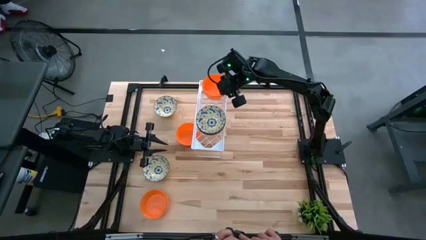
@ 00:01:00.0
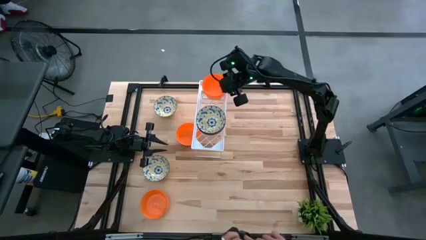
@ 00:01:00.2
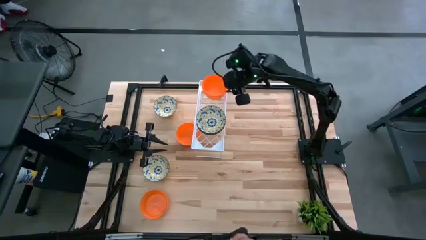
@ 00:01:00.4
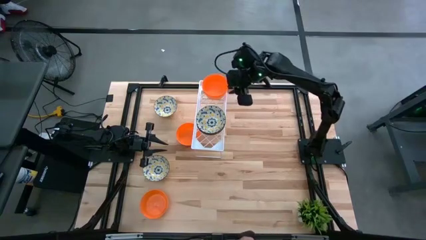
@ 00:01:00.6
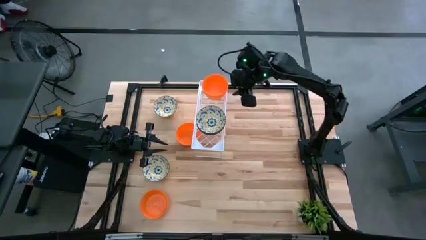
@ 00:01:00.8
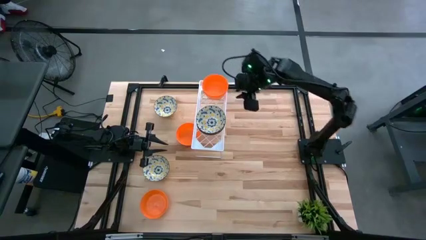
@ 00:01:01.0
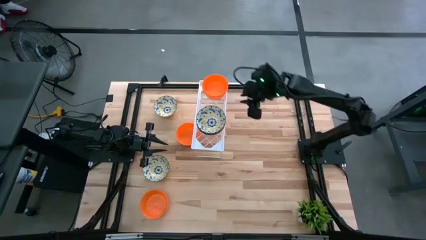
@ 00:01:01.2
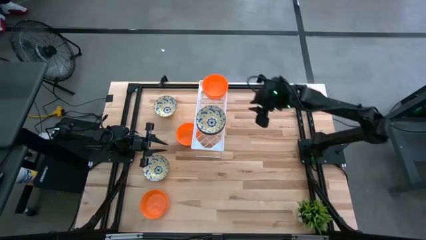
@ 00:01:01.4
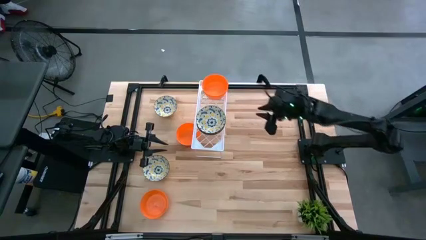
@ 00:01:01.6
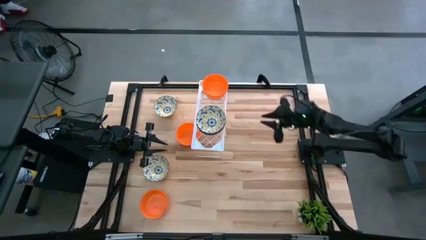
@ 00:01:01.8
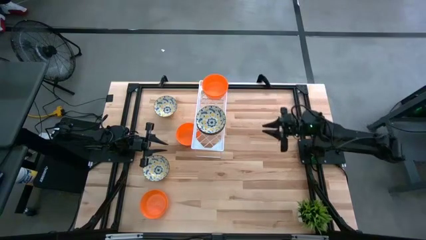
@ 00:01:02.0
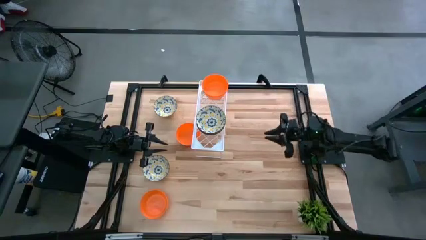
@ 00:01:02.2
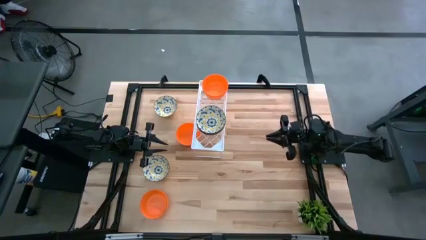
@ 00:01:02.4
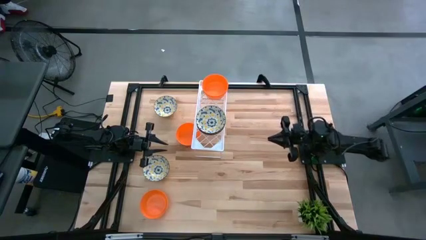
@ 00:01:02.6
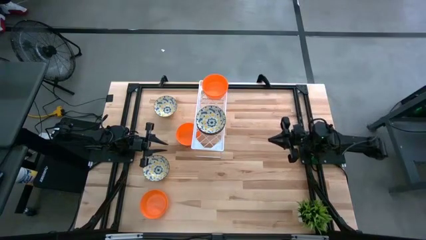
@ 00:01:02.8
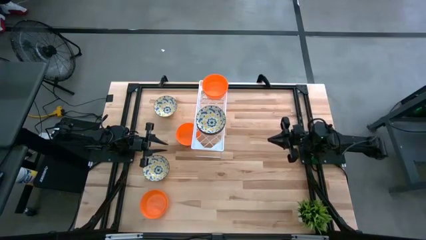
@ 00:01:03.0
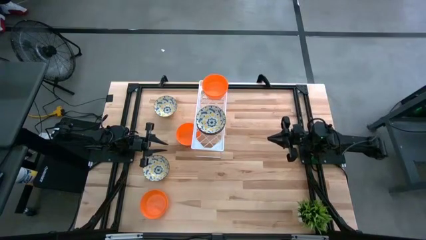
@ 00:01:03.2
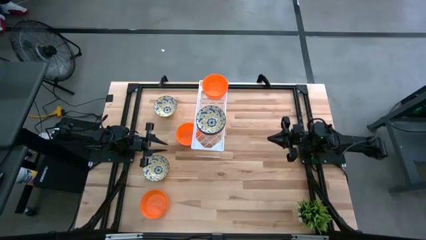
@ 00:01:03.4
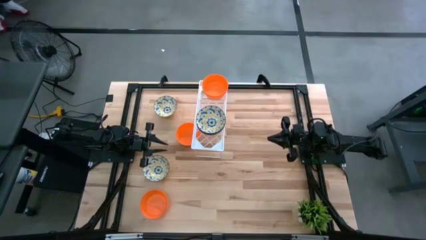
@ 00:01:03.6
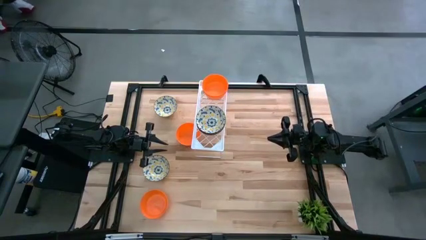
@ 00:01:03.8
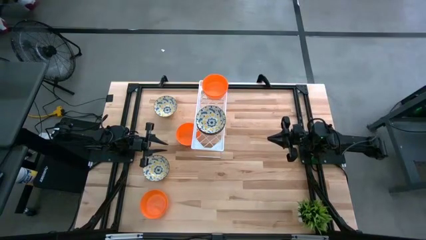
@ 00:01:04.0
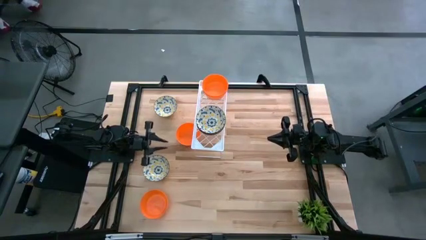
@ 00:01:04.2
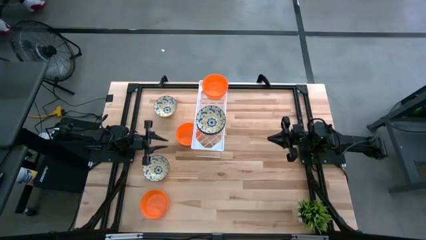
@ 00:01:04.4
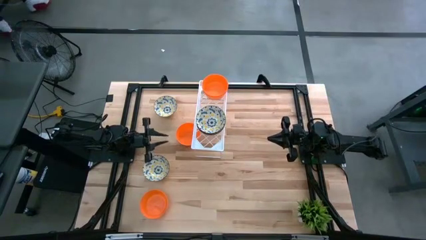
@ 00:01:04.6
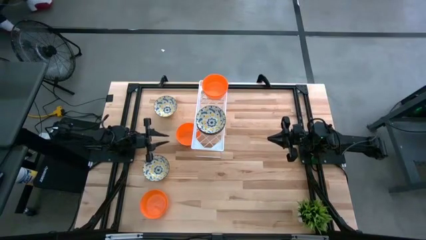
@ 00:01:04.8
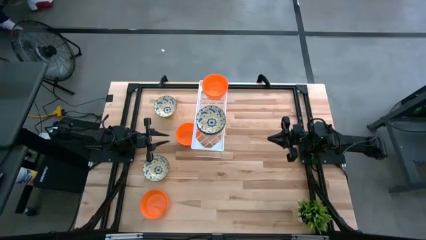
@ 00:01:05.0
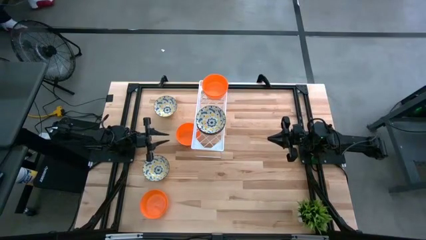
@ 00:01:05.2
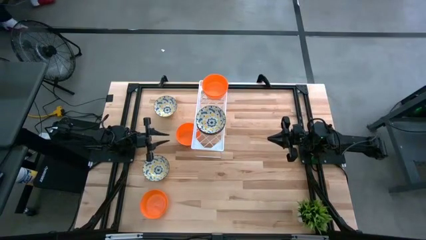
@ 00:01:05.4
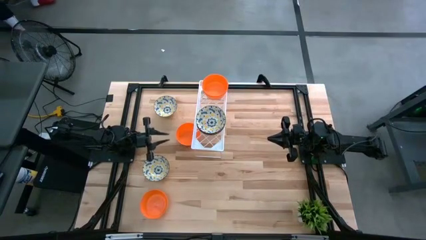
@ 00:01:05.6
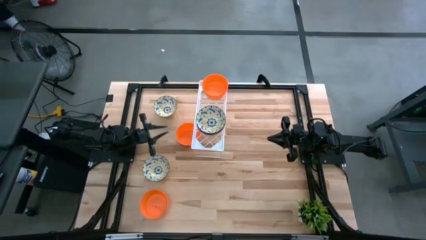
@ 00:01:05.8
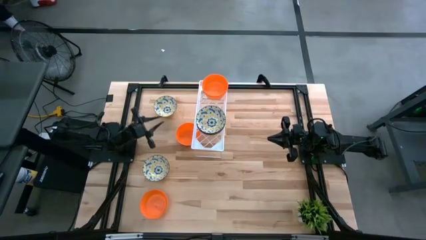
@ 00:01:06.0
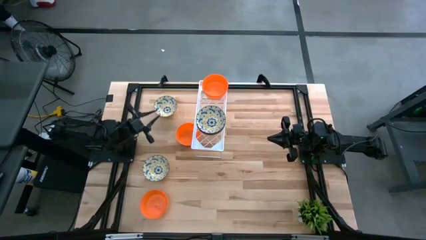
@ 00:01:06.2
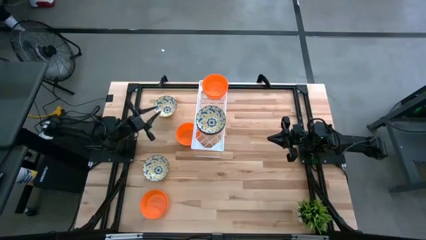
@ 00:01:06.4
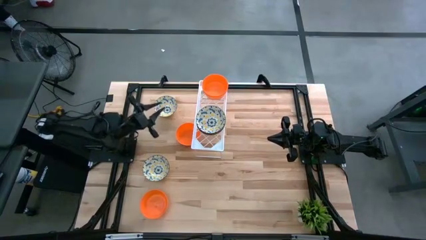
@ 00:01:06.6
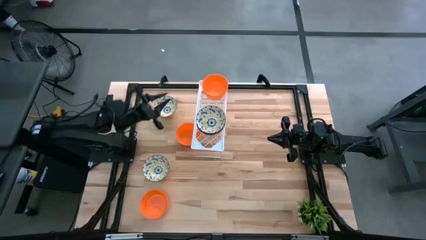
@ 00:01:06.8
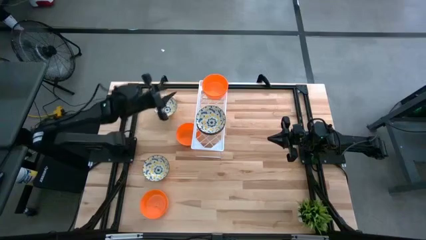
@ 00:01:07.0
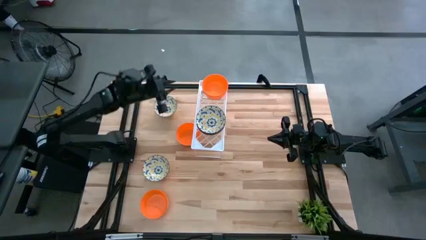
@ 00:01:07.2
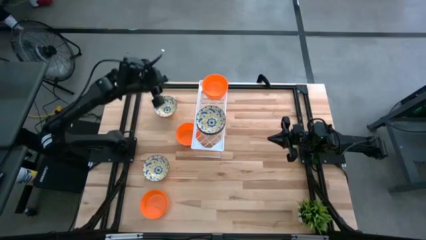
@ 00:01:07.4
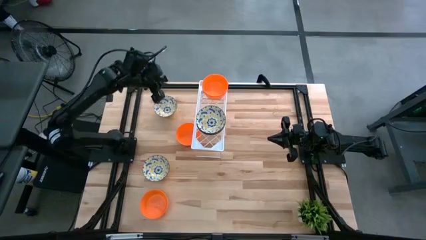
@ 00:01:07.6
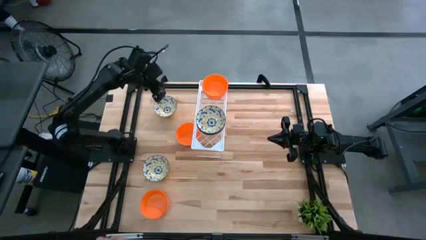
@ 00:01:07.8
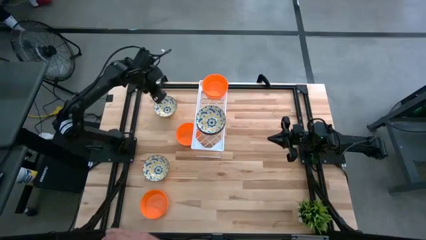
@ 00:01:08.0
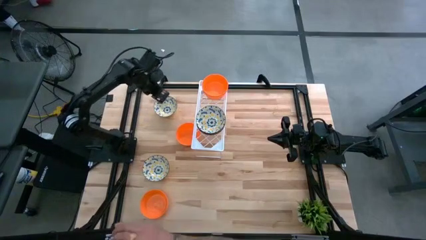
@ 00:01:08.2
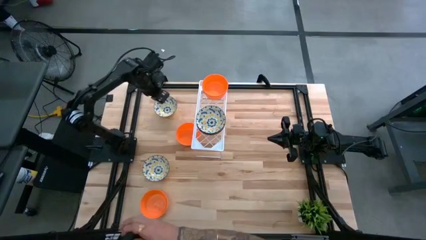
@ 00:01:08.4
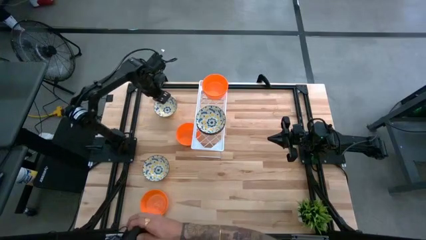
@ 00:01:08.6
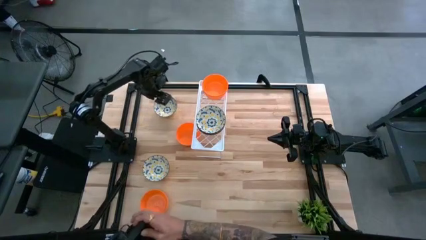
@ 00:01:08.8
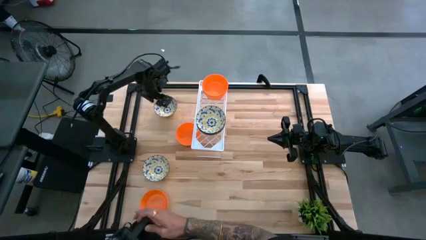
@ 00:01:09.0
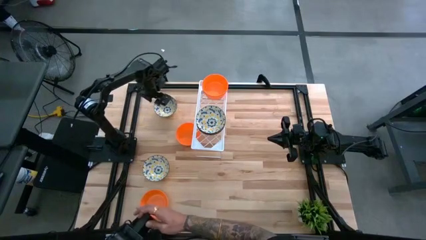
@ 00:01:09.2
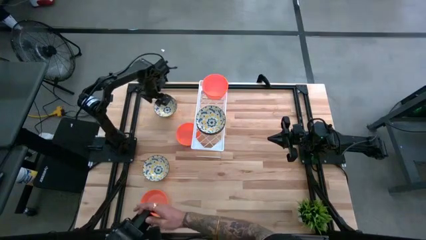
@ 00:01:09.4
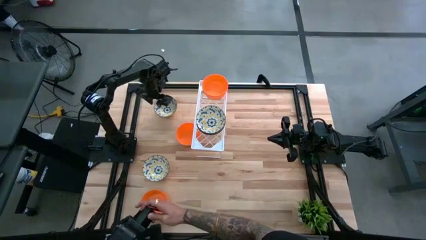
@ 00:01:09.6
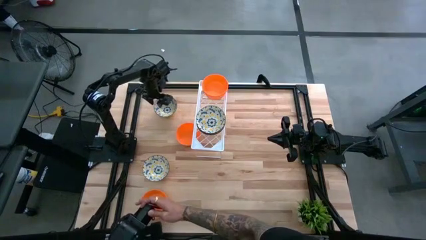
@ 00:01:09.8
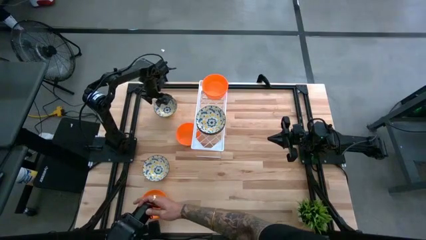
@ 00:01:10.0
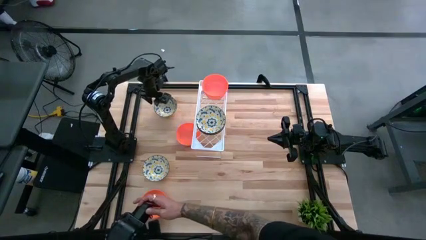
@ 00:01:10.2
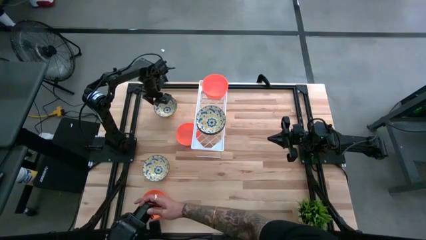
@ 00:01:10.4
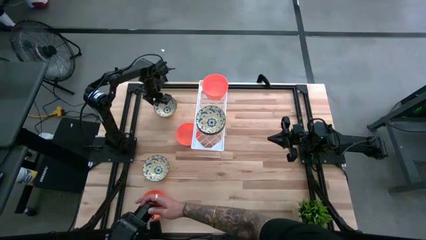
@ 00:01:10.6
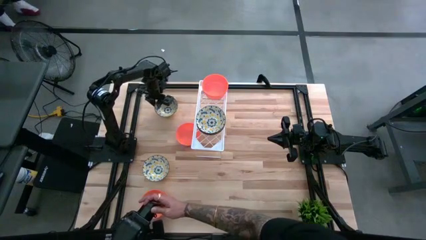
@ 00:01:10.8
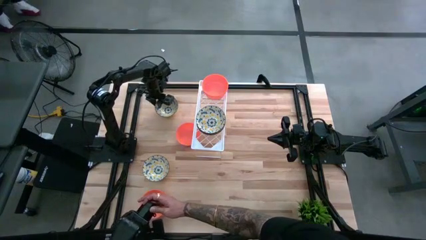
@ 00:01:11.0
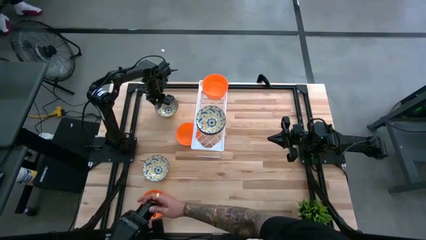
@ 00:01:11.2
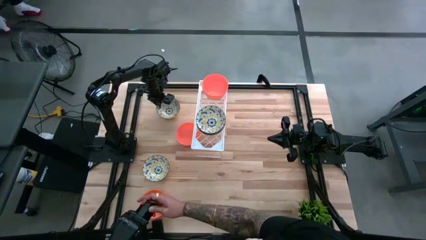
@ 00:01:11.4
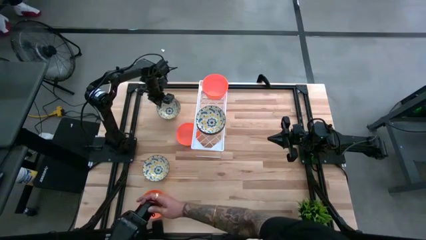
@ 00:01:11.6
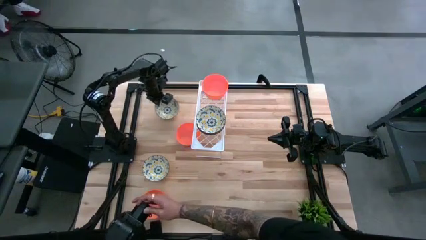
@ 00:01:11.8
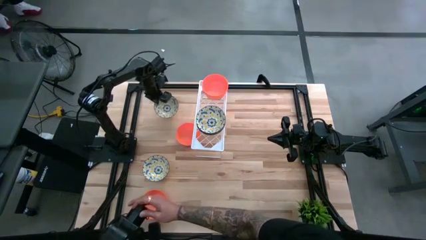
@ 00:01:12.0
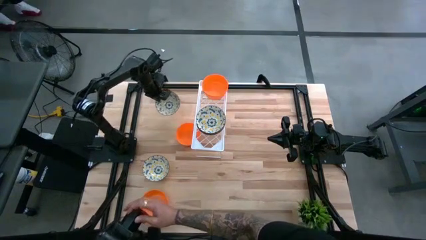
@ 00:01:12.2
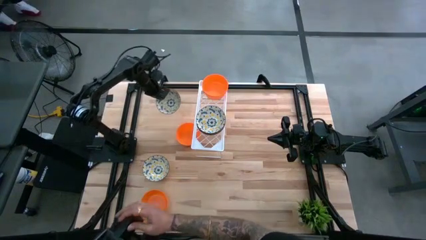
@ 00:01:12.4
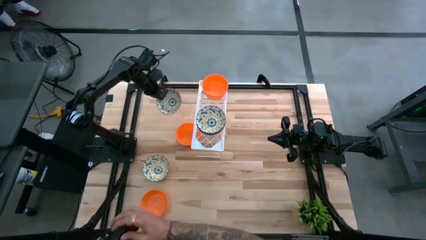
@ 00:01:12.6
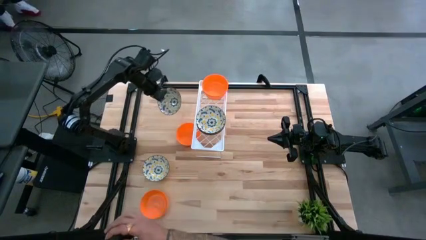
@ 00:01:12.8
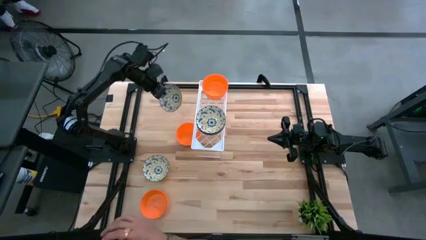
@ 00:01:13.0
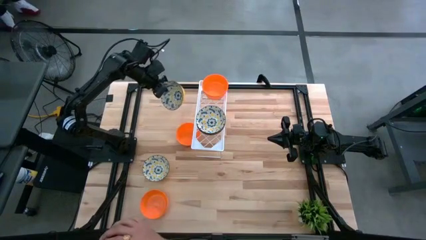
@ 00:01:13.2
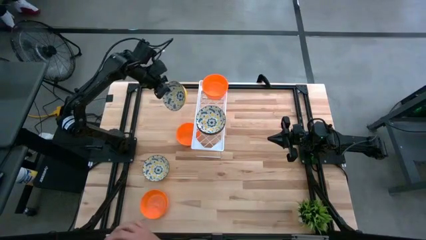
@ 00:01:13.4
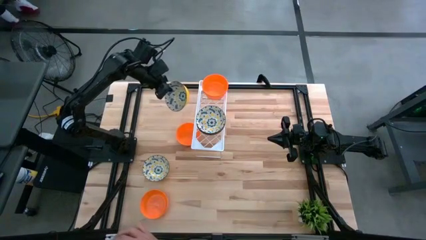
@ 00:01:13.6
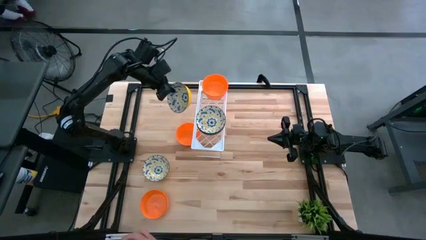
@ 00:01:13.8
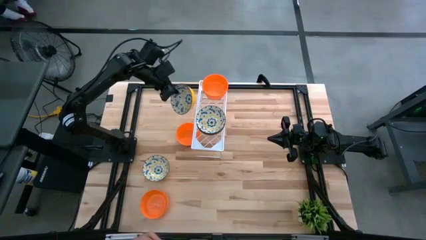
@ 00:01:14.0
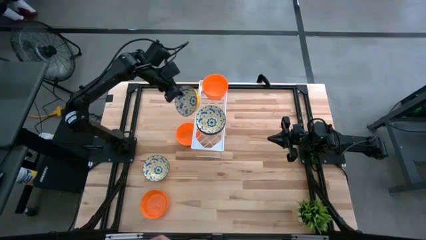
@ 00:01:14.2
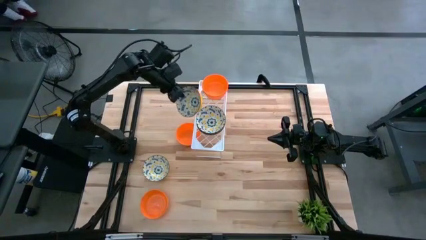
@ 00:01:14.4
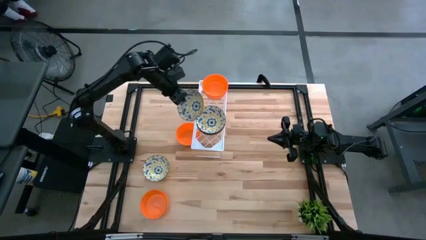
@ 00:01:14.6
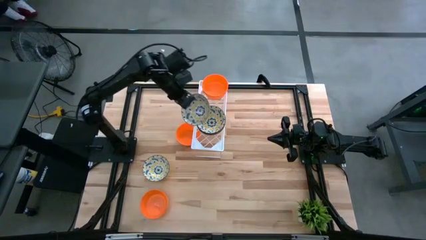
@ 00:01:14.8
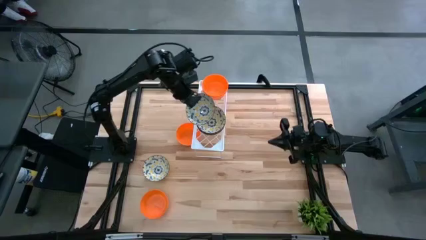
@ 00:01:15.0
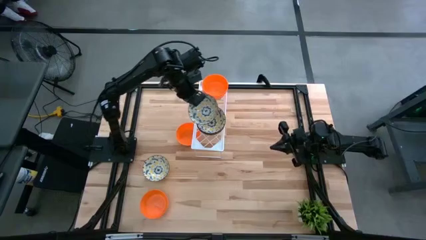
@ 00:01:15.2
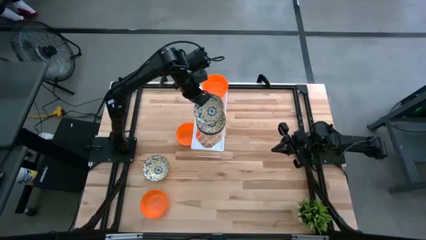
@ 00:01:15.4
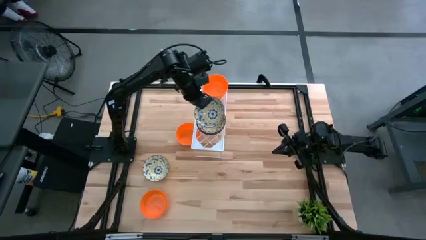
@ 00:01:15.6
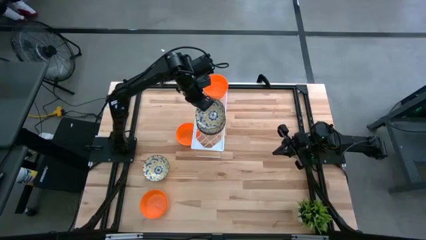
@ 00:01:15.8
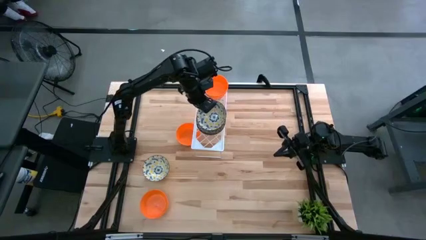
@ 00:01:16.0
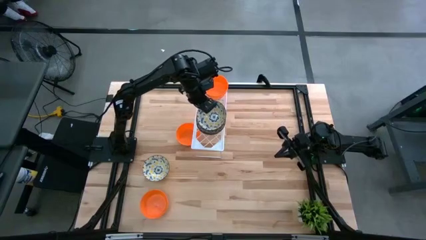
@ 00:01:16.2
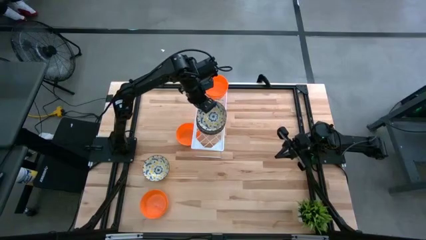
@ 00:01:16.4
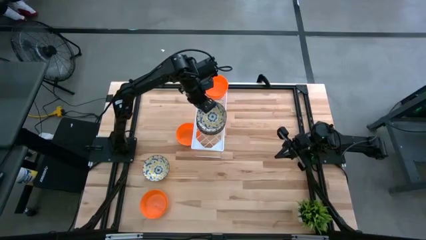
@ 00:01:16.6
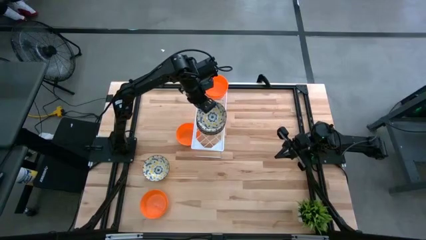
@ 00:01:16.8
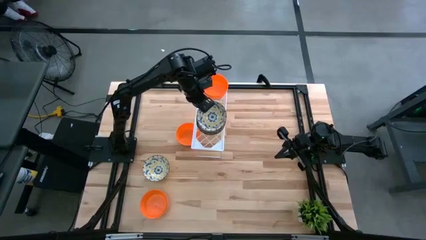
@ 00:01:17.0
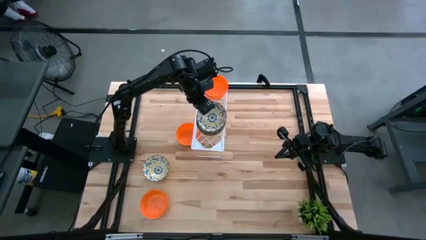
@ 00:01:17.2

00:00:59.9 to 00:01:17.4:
Task: Pick & Place Mini bowls
Stack the white and yellow bowl on the stacked white and yellow bowls on the shelf
